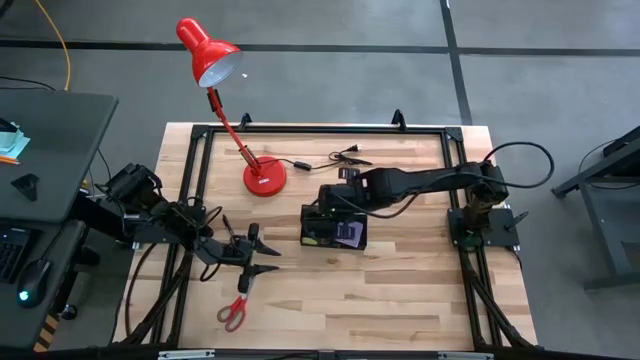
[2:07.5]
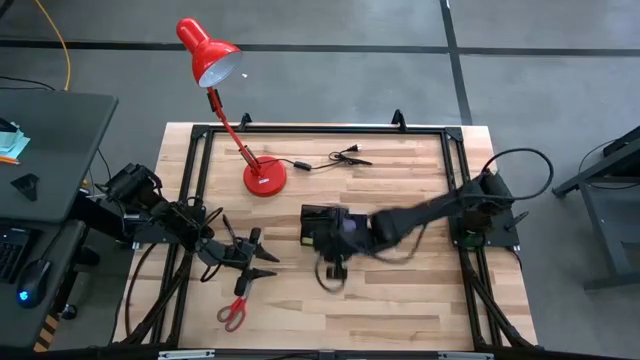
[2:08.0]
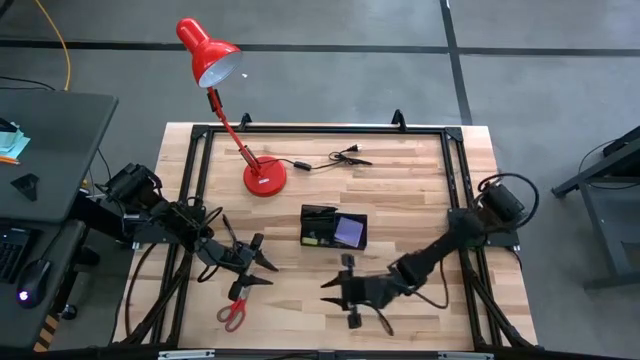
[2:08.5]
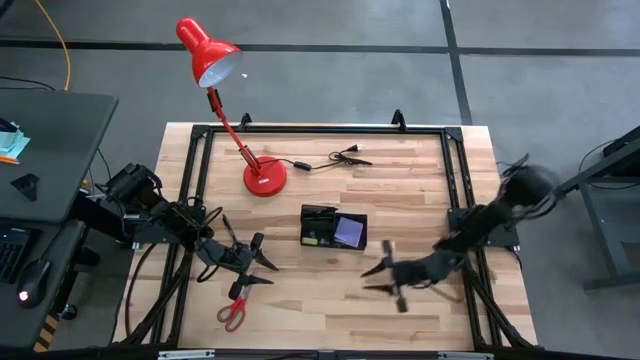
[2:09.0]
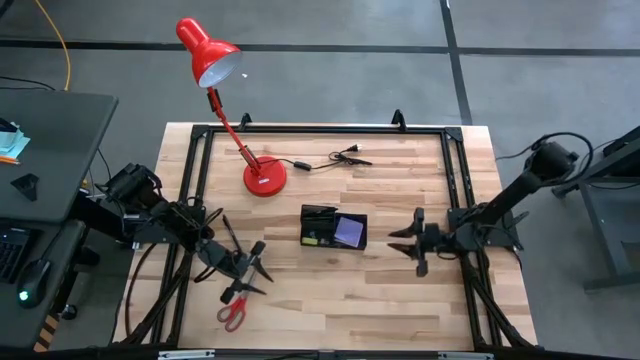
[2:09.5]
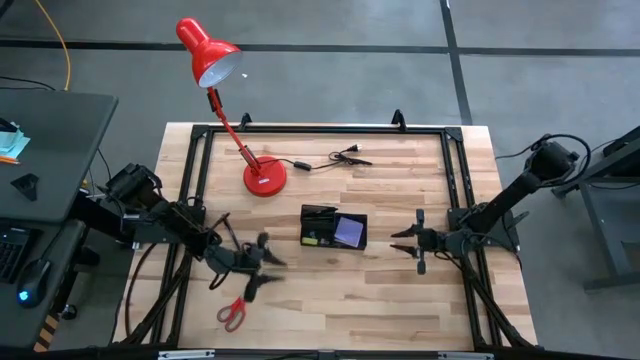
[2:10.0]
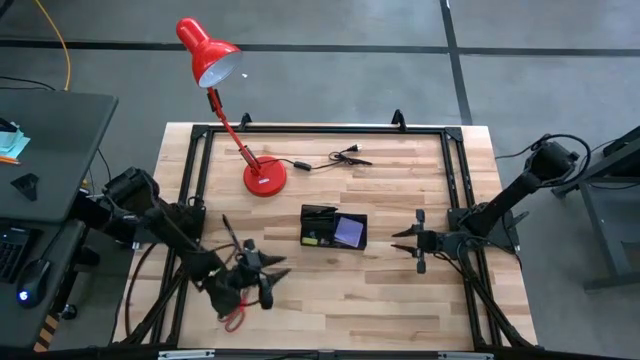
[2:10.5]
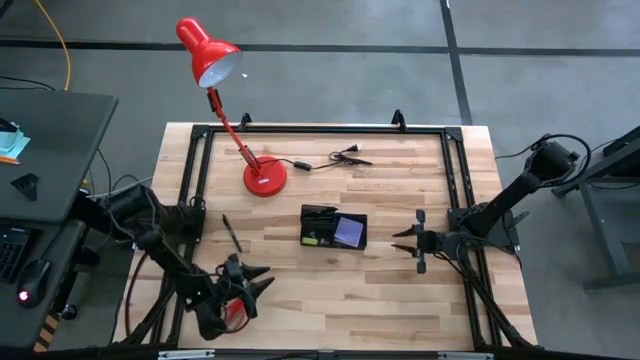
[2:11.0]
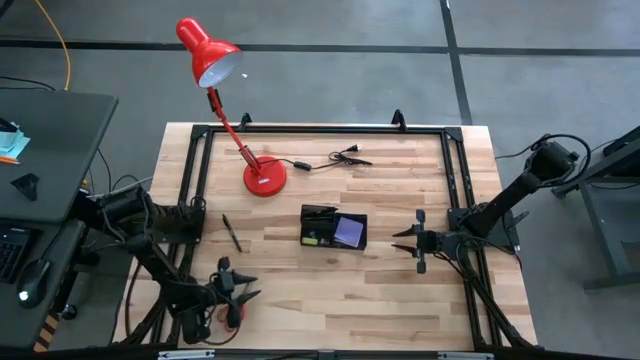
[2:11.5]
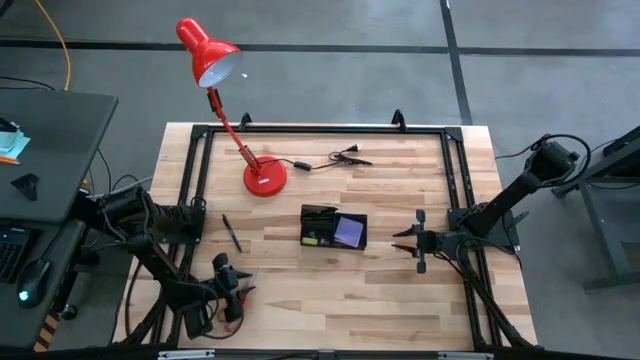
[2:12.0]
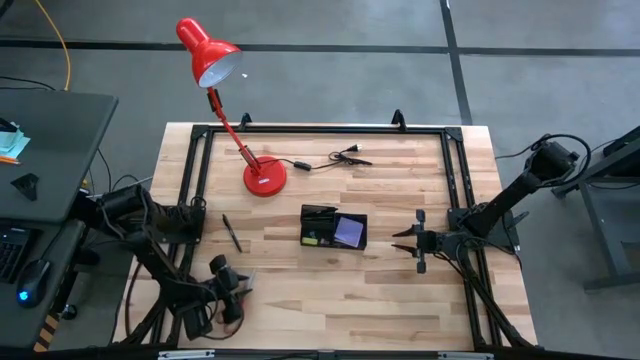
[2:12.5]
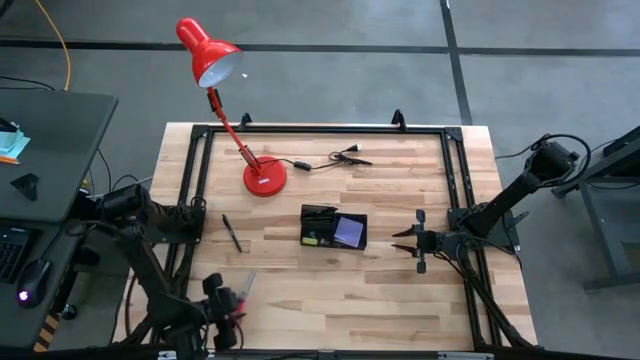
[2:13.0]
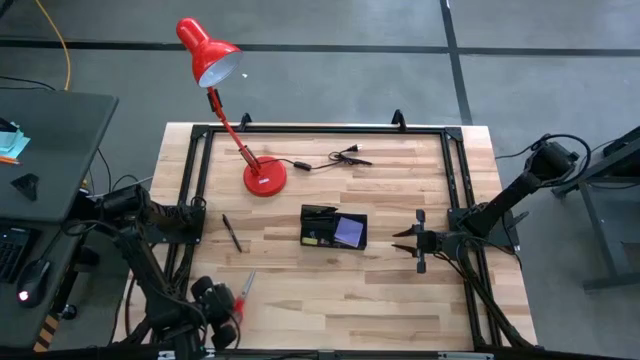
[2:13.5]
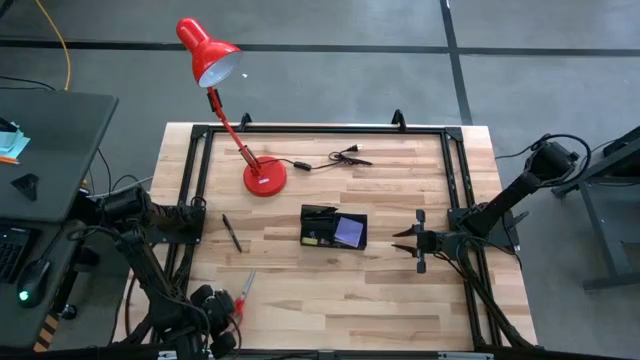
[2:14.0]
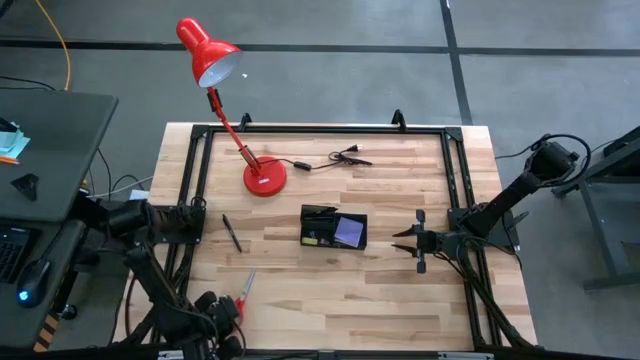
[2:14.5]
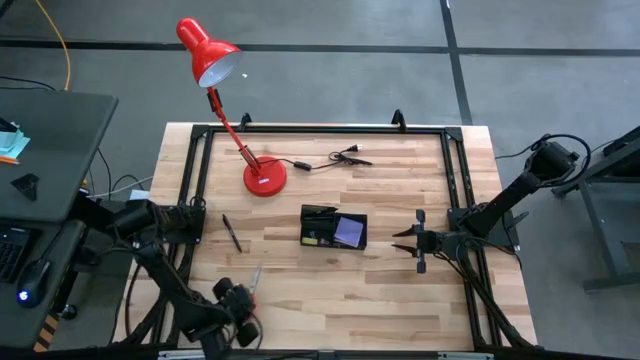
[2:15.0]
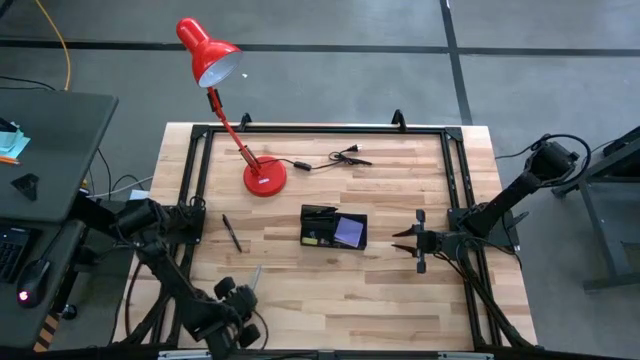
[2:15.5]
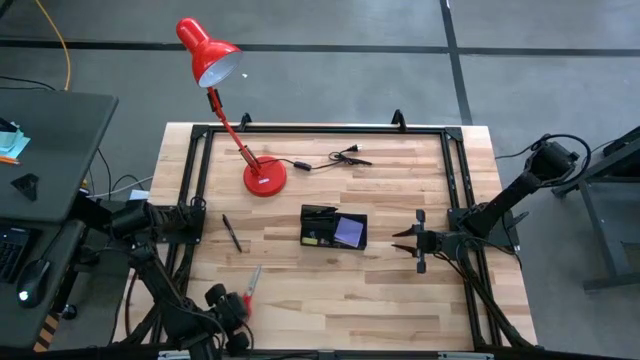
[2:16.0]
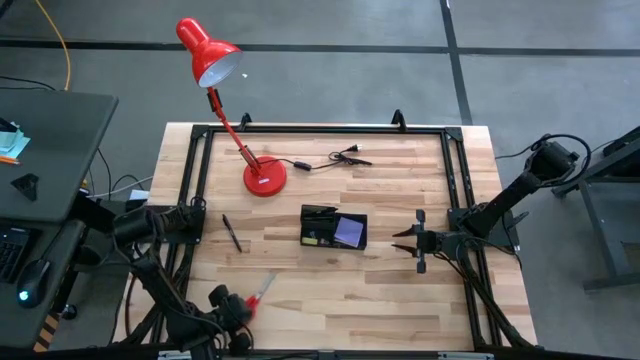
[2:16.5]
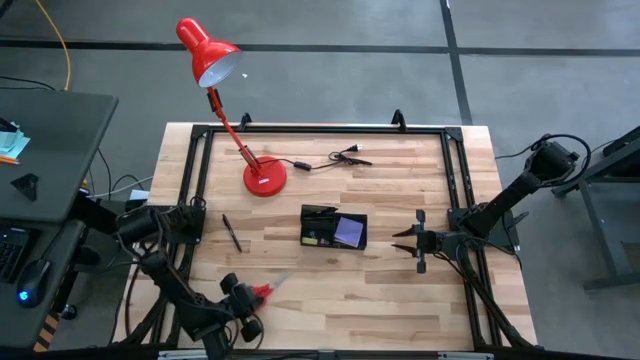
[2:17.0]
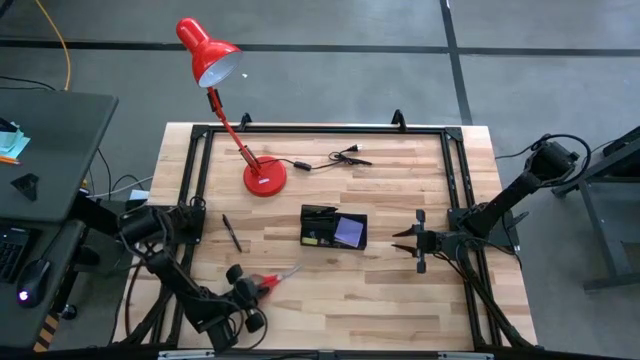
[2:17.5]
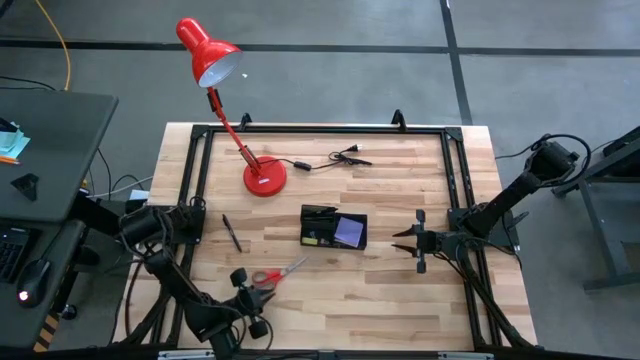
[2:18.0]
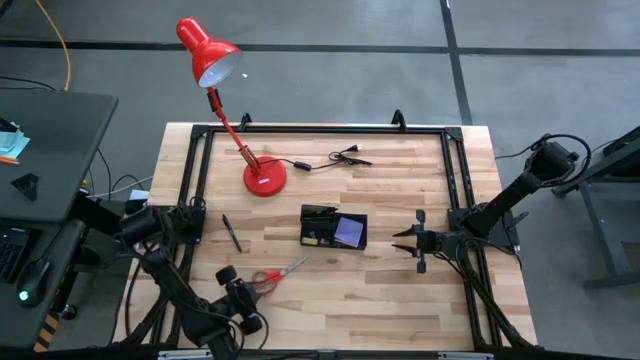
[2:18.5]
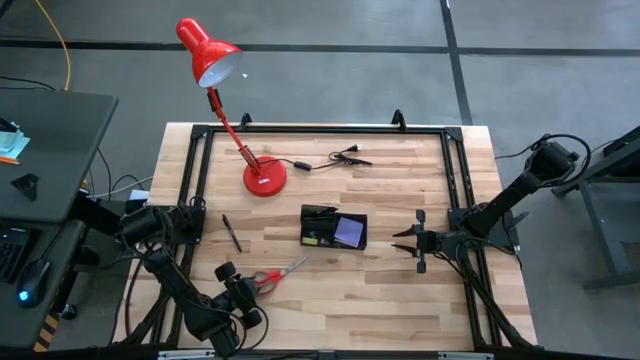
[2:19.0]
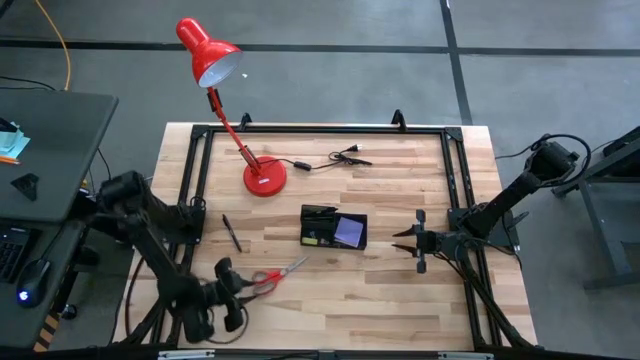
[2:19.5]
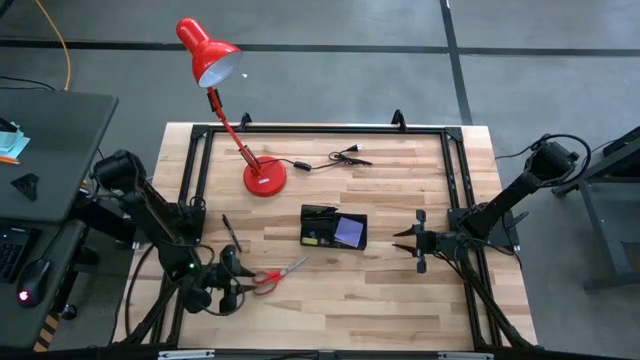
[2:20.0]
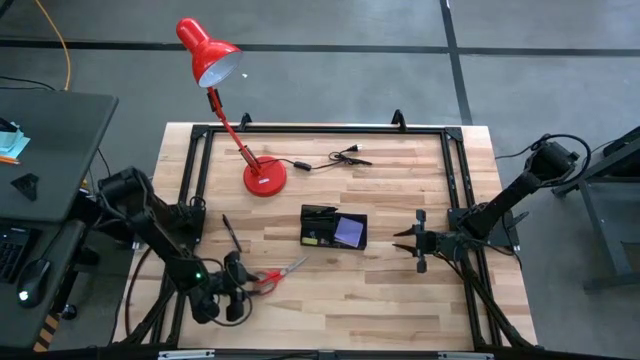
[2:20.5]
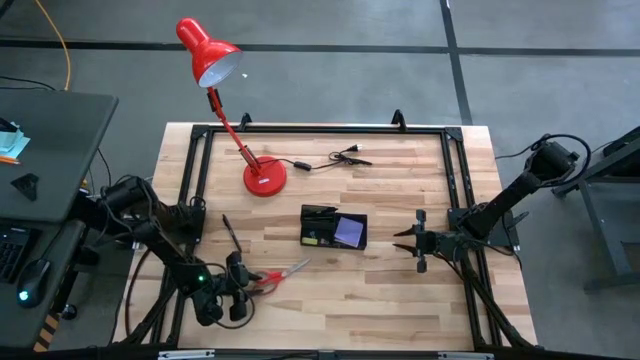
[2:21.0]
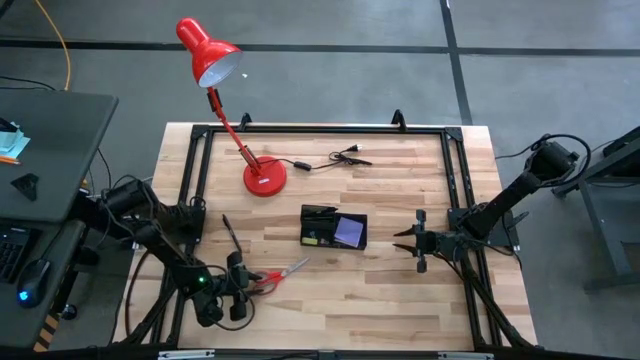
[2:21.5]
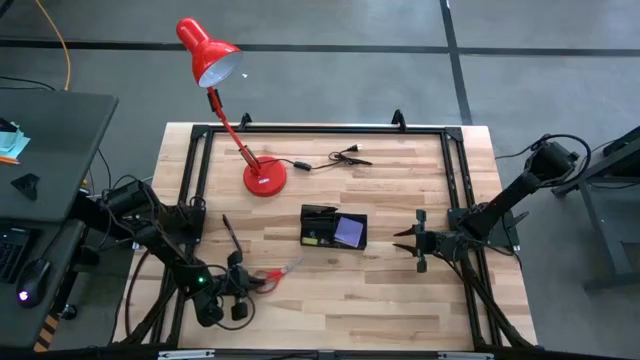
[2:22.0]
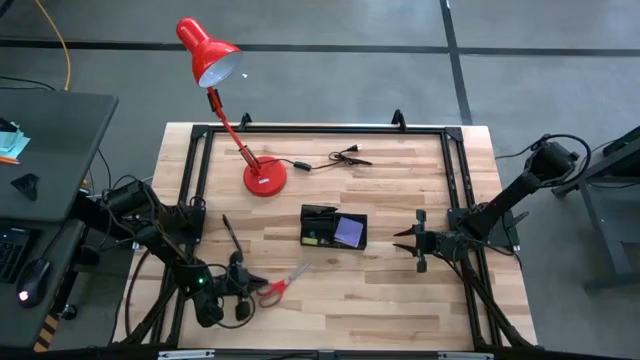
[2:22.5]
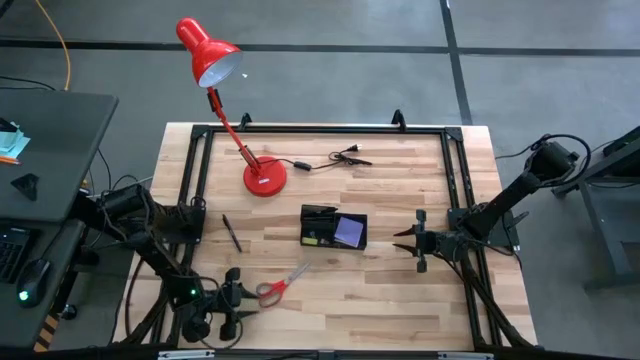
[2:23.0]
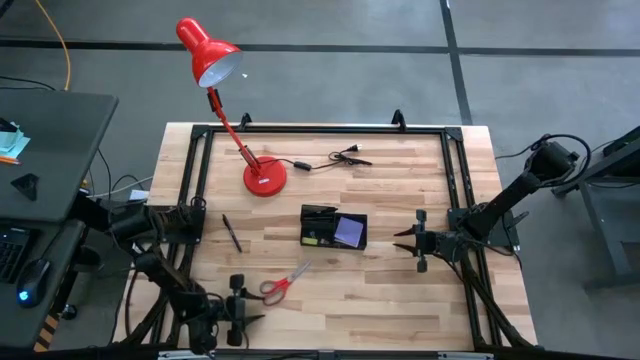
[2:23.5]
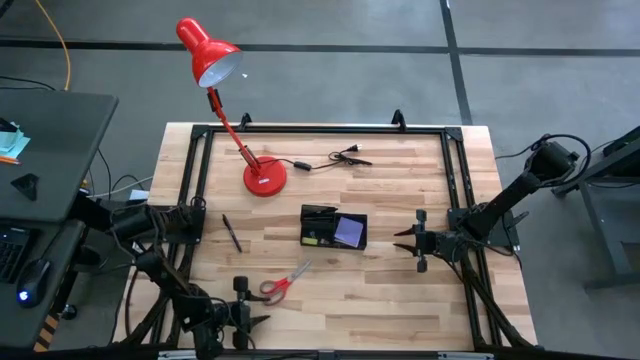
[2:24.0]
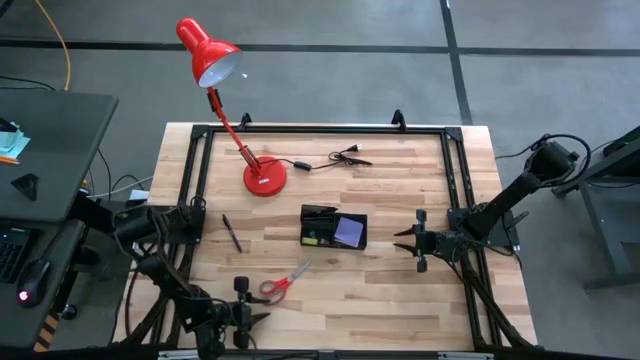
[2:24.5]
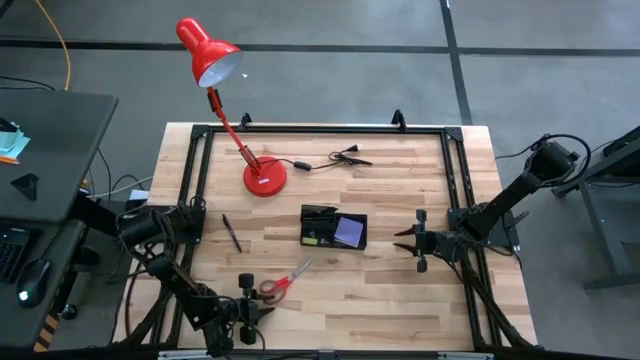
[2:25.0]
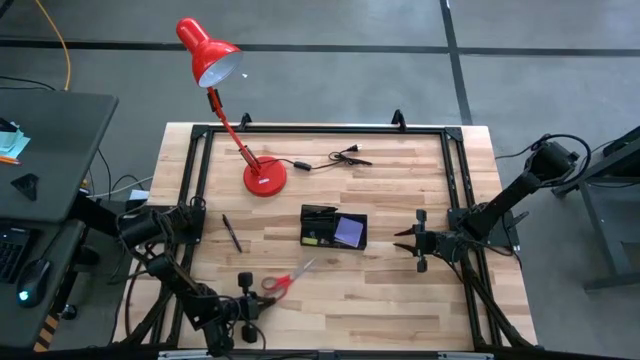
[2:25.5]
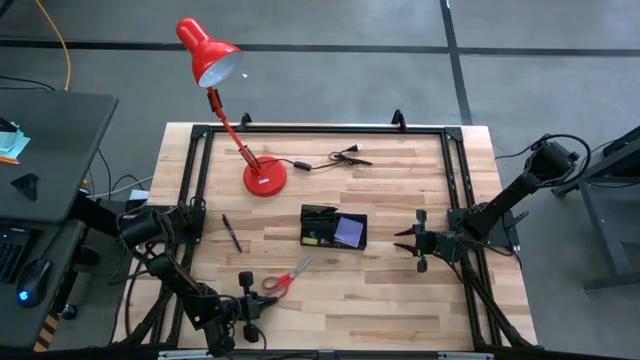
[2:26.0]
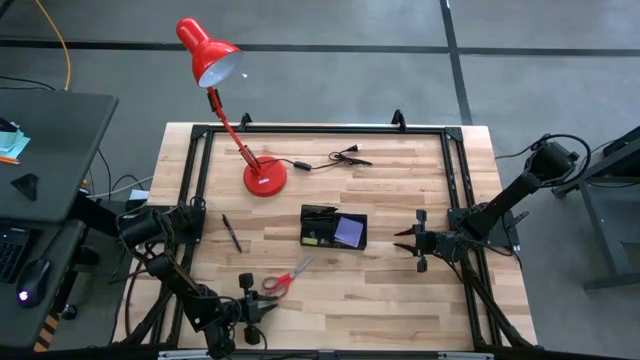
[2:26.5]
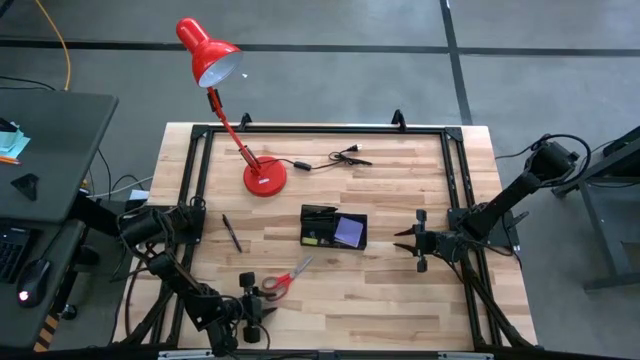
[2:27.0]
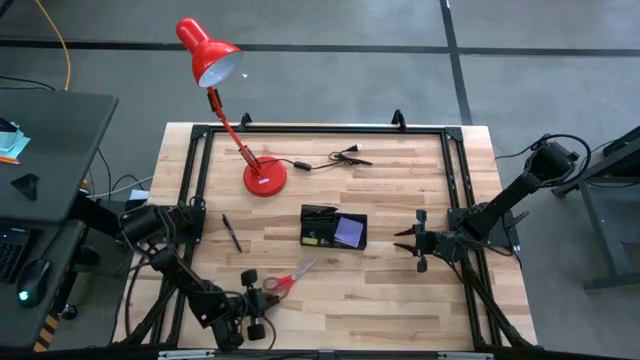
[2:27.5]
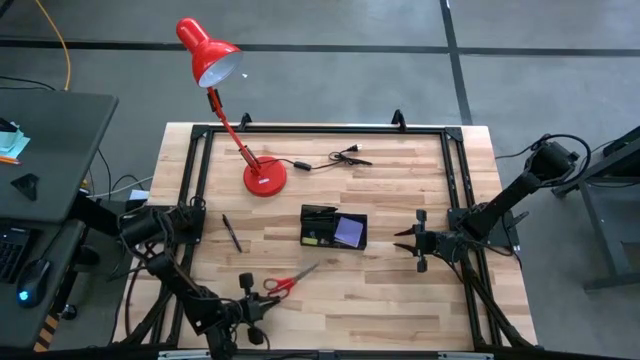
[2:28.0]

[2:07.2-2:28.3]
Task: Pick and place office supplies into organizer
Put the red scissors into the black desk organizer

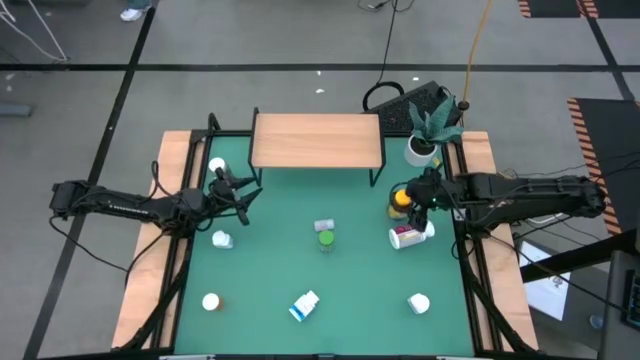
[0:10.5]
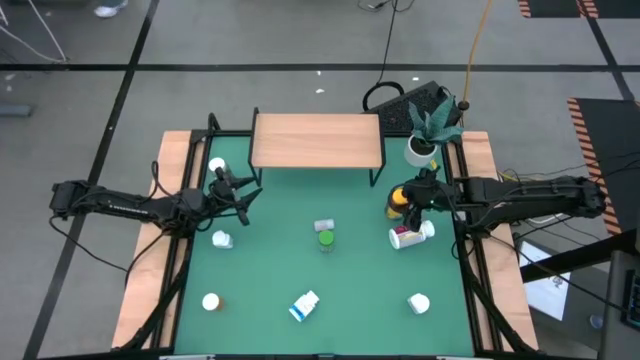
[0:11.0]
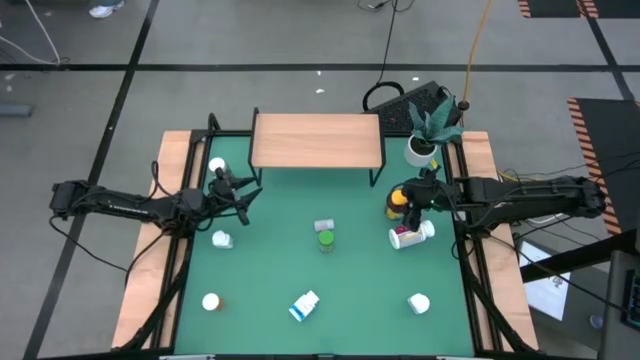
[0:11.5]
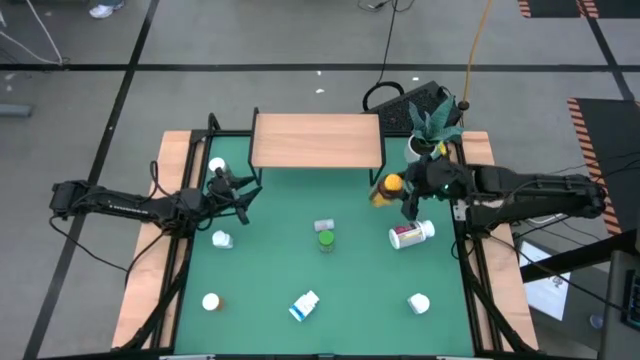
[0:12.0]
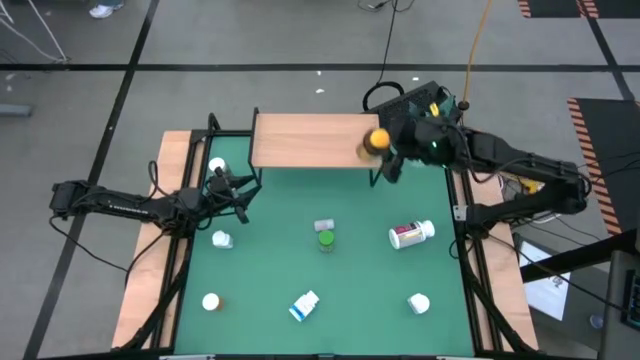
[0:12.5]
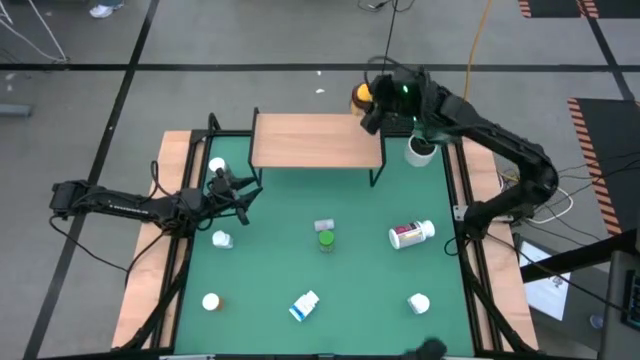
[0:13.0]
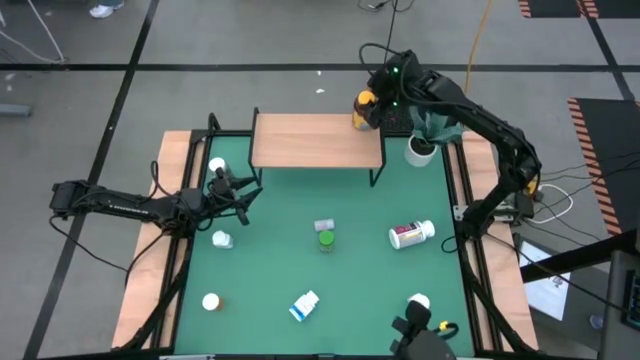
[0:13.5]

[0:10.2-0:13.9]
Task: Pick and place medicine bottles onto shelf by color
Put the yellow pill bottle on the shelf
